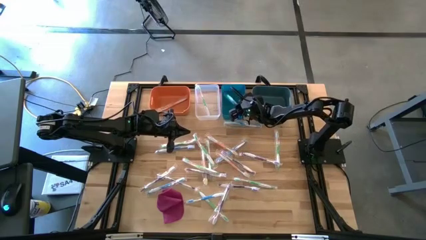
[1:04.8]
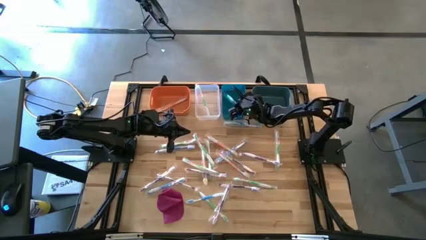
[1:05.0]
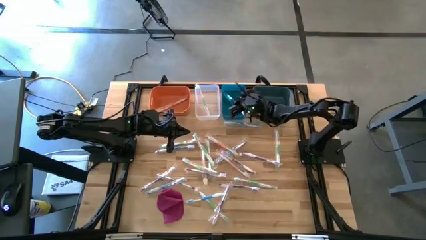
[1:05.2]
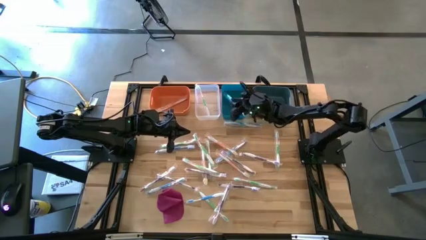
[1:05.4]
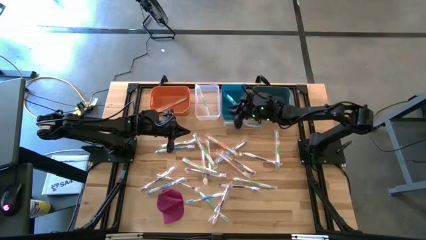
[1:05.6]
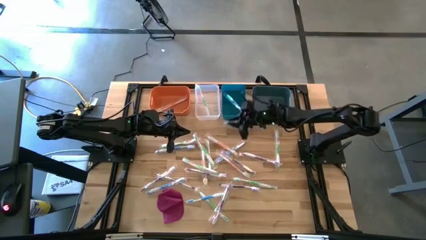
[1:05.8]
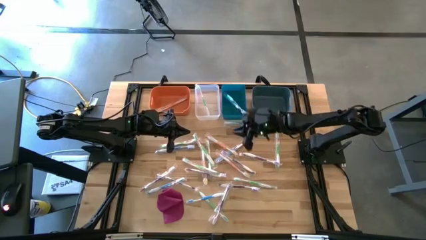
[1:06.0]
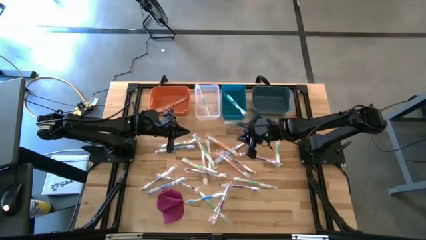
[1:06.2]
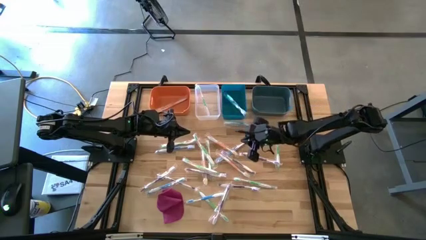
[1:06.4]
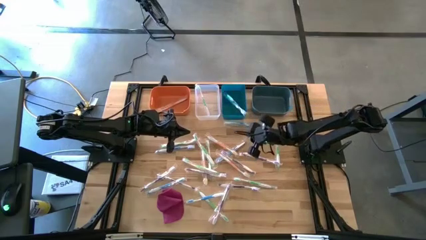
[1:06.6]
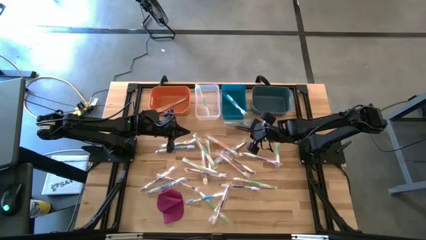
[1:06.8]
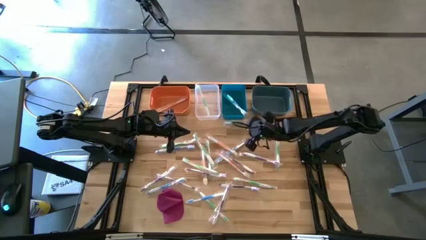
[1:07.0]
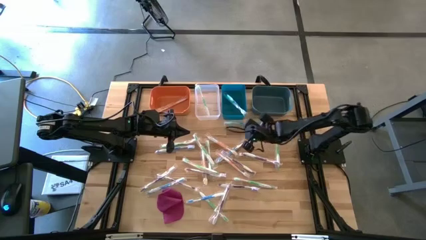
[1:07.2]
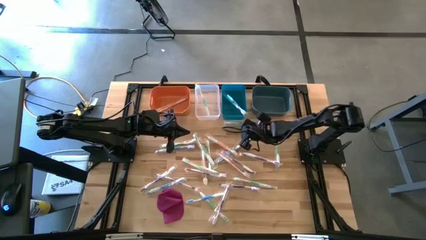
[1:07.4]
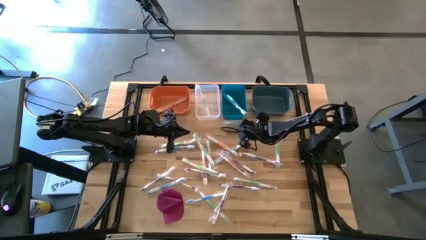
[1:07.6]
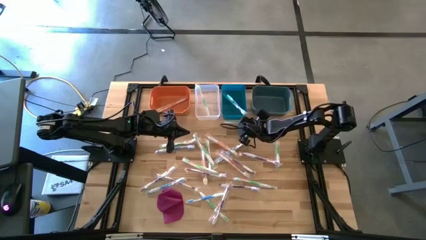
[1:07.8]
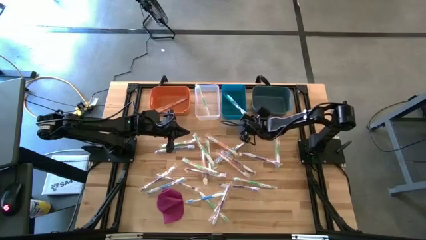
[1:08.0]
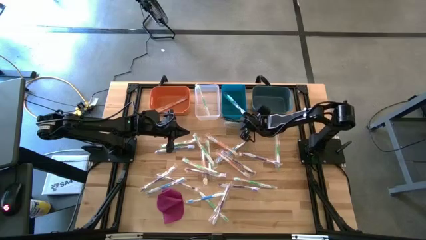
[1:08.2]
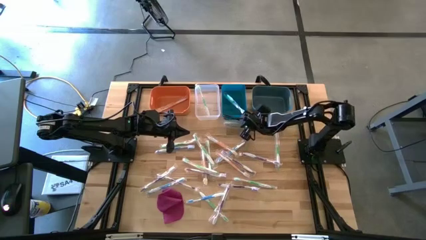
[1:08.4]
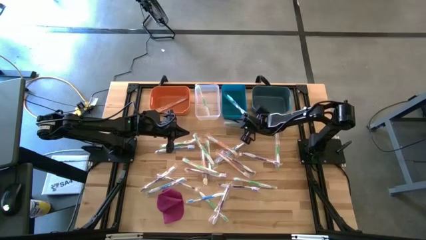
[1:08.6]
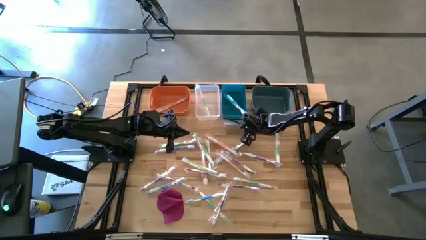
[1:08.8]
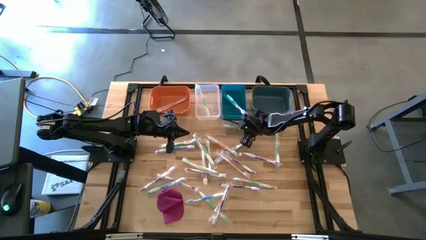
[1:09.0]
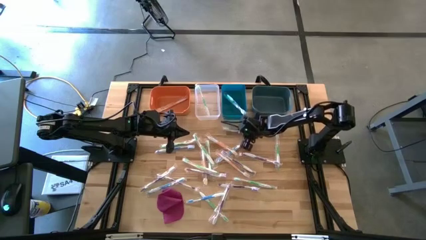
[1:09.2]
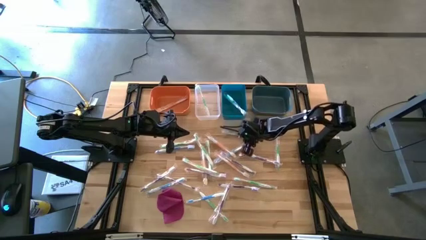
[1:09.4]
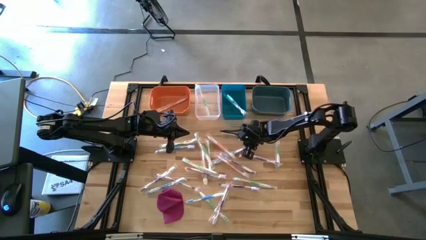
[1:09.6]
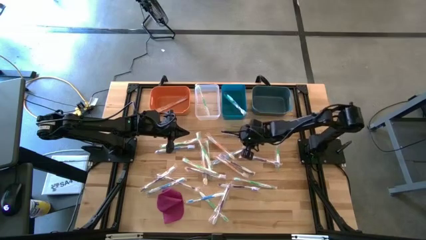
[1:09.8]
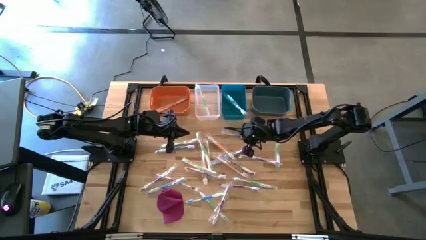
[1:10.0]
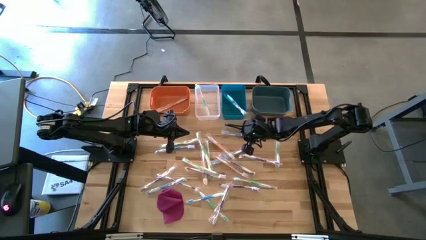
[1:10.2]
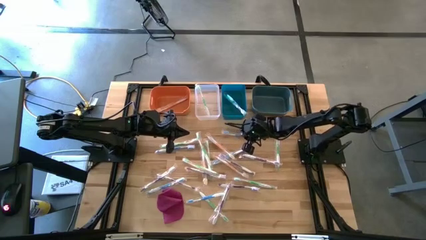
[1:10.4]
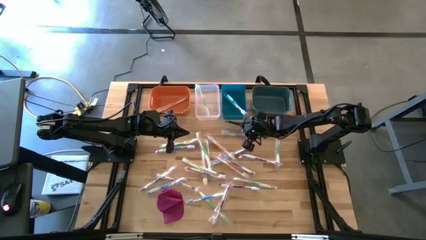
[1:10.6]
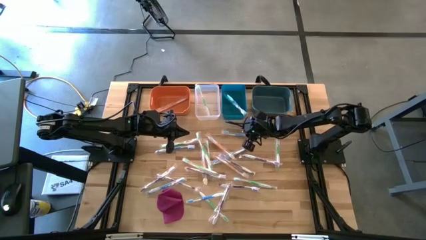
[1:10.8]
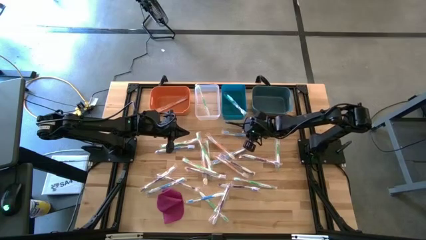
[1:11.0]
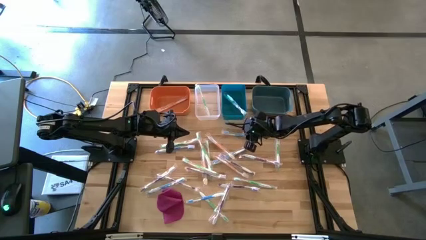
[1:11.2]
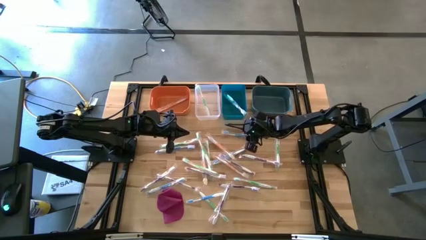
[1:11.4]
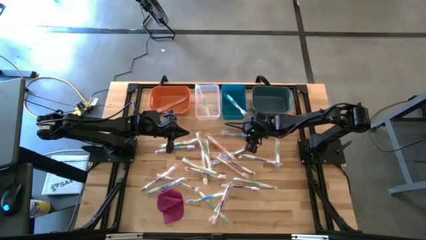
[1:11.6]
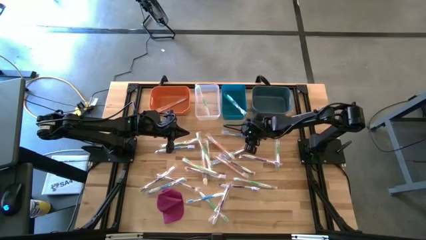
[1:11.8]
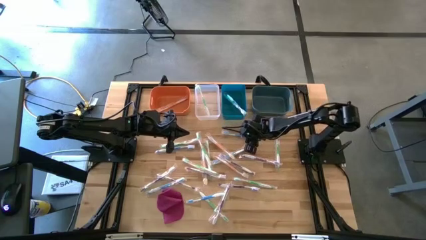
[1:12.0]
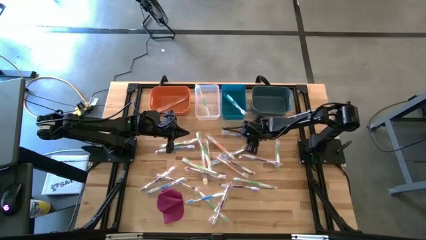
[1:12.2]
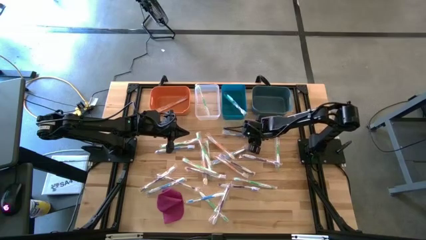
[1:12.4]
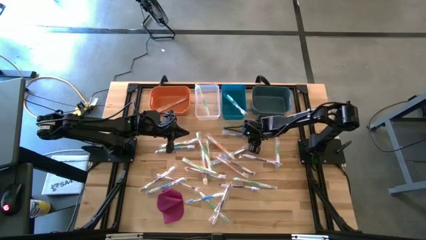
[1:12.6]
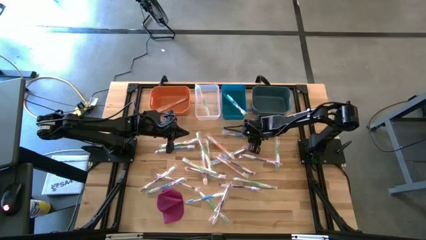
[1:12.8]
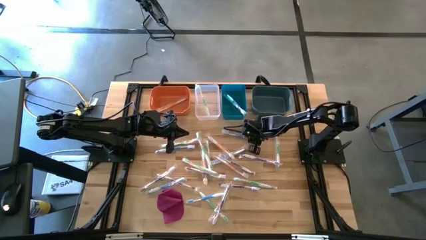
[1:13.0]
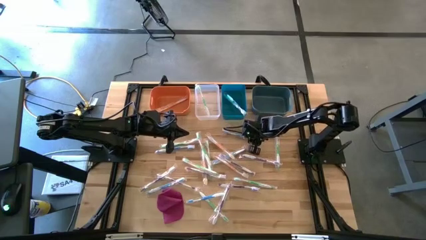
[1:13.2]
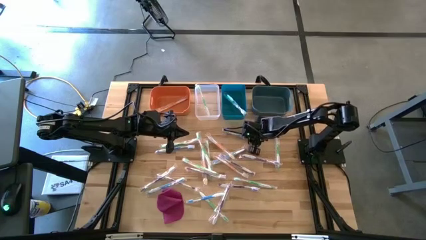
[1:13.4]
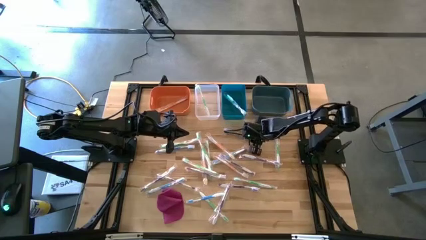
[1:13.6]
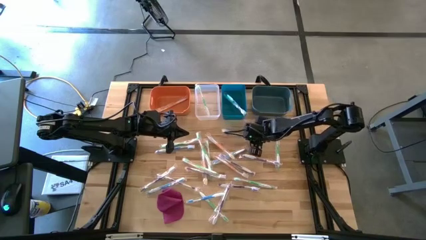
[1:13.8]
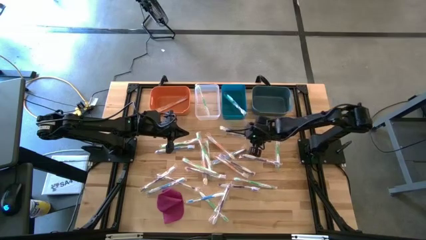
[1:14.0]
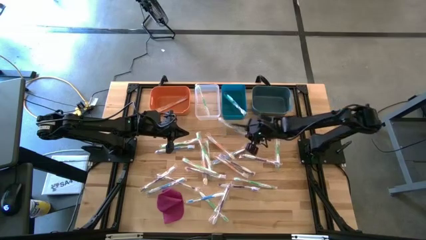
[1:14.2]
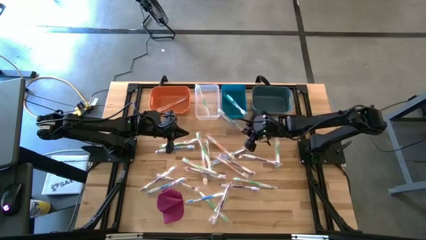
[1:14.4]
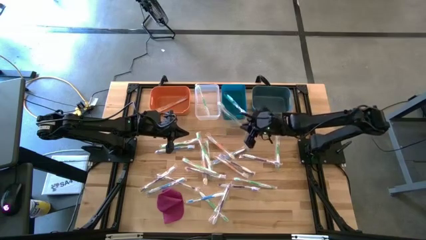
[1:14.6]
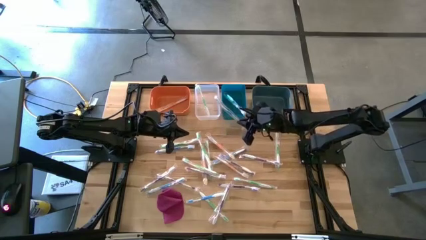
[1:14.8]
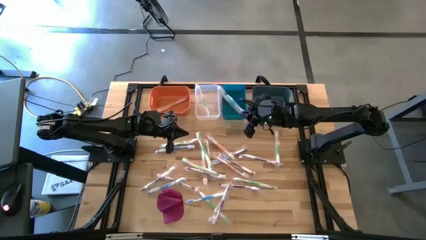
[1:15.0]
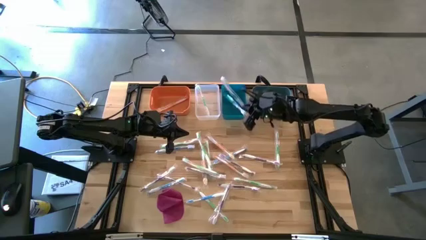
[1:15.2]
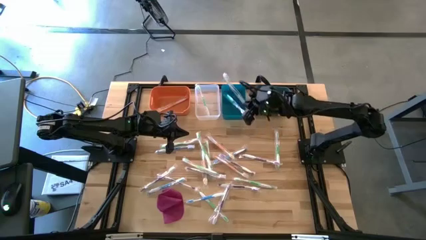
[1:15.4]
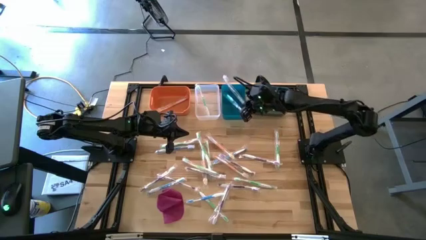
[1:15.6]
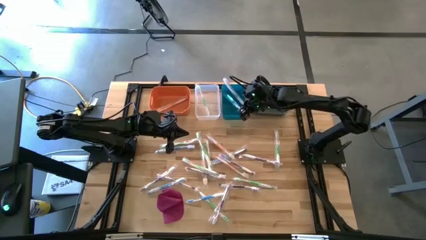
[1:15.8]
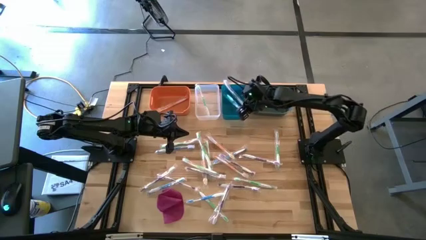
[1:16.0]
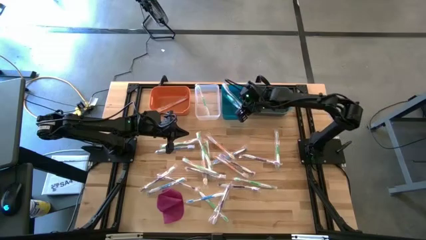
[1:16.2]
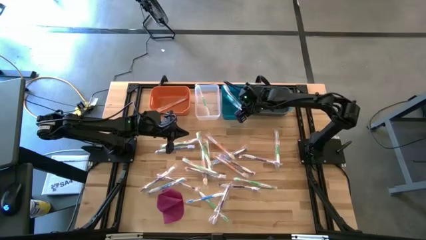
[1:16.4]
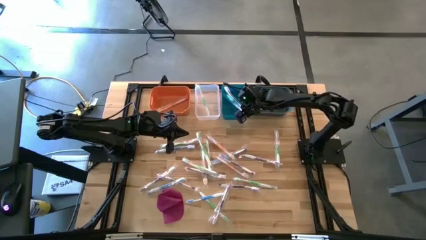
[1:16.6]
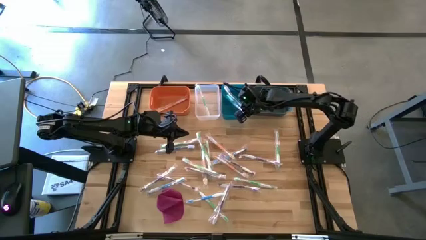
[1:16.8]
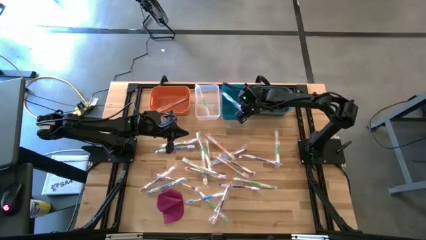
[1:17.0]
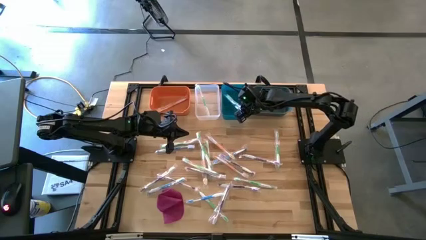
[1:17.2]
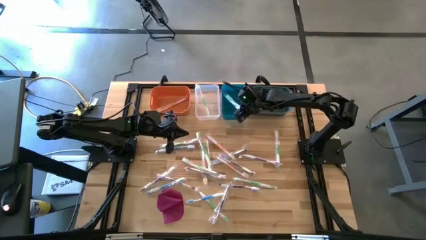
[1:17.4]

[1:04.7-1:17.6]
Task: Pick & Place Toothbrushes
Put the blue toothbrush into the blue bin
